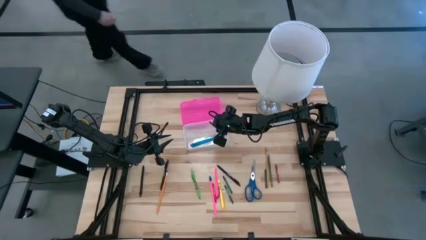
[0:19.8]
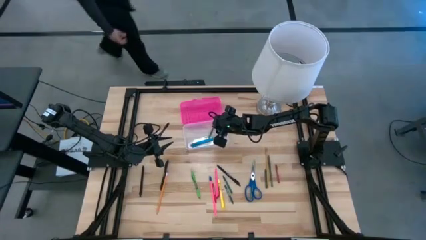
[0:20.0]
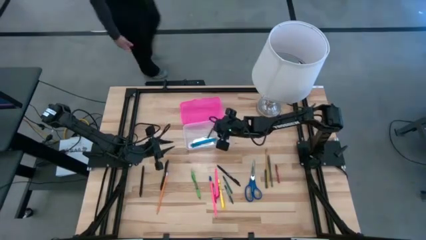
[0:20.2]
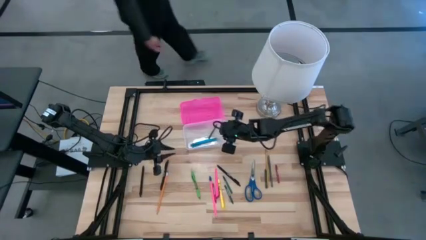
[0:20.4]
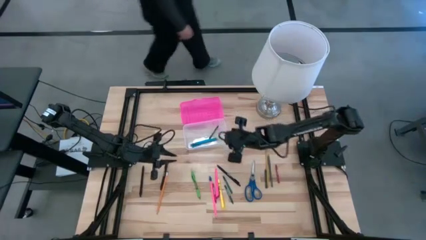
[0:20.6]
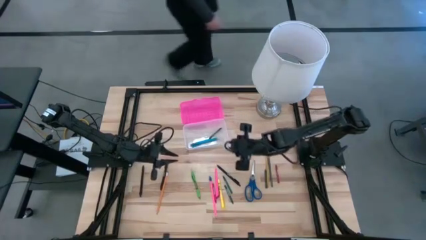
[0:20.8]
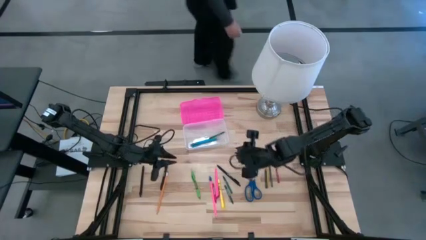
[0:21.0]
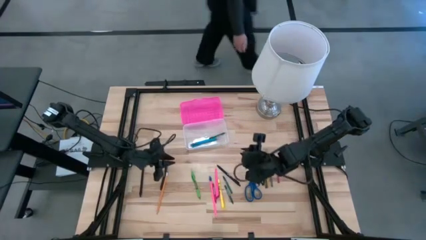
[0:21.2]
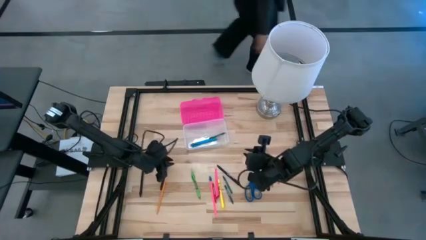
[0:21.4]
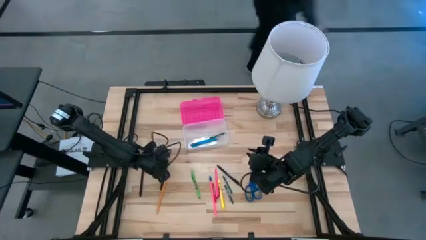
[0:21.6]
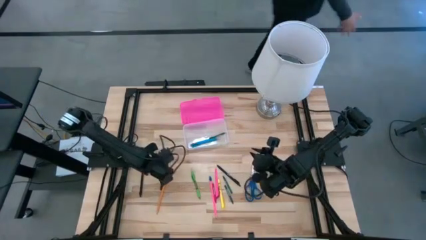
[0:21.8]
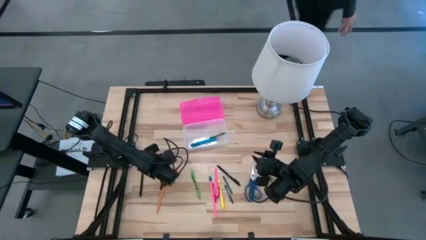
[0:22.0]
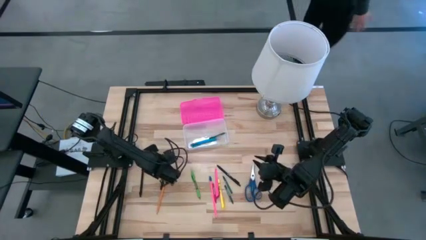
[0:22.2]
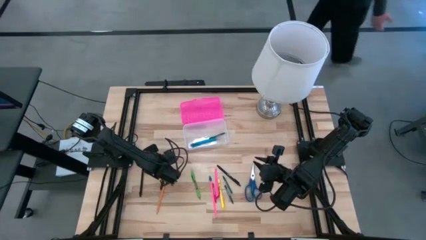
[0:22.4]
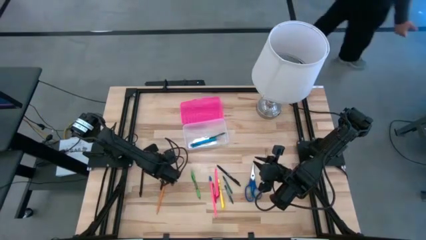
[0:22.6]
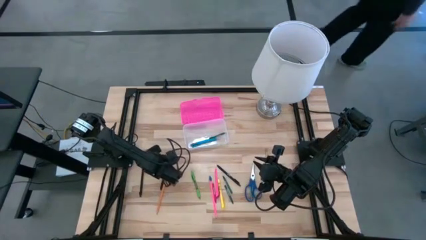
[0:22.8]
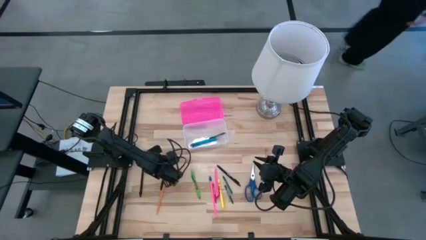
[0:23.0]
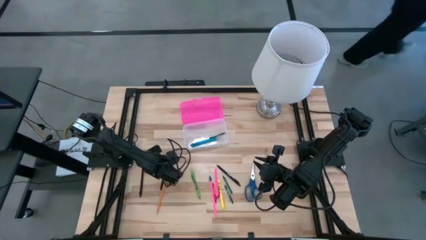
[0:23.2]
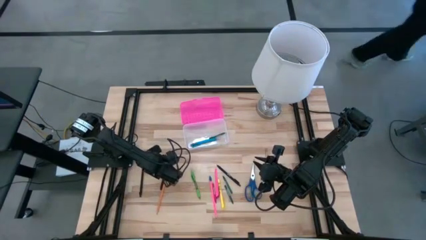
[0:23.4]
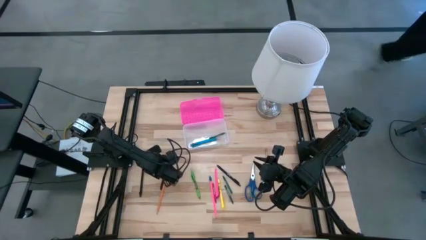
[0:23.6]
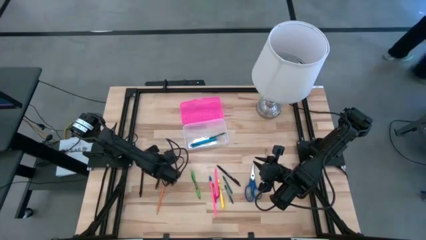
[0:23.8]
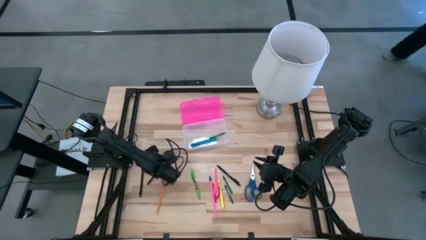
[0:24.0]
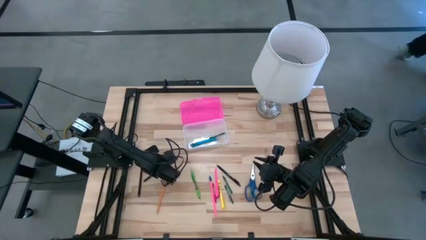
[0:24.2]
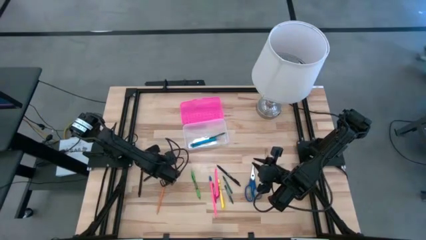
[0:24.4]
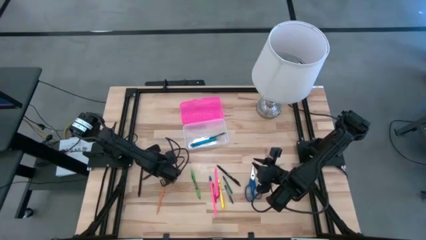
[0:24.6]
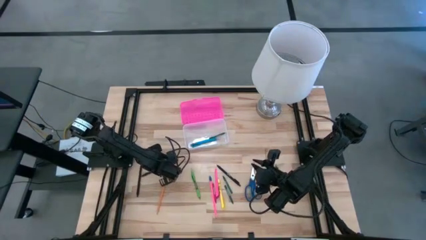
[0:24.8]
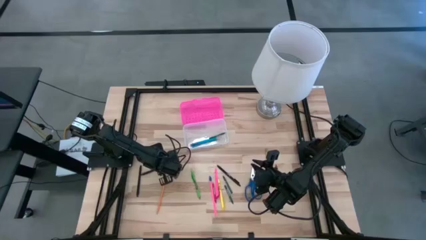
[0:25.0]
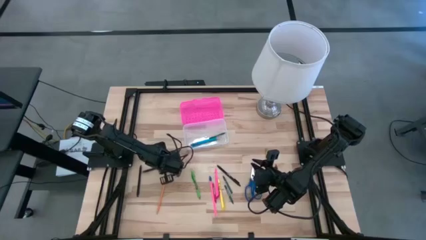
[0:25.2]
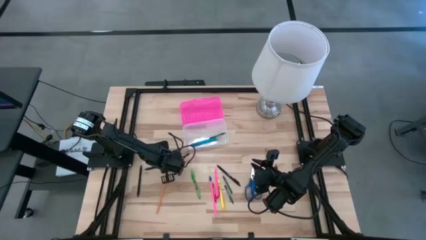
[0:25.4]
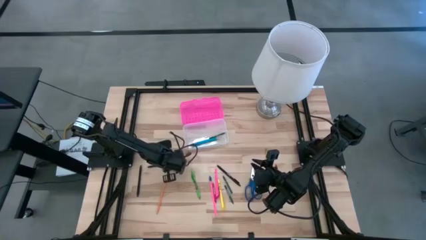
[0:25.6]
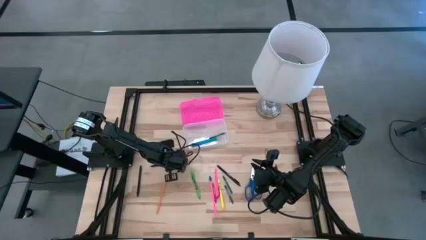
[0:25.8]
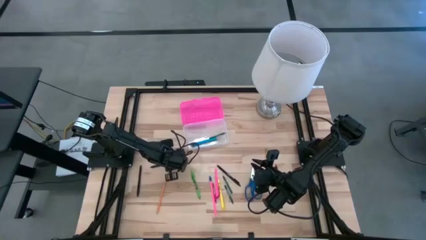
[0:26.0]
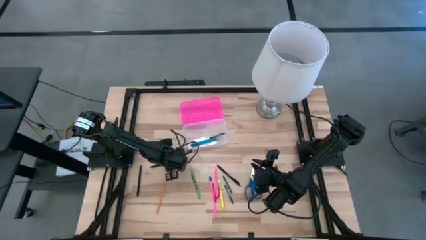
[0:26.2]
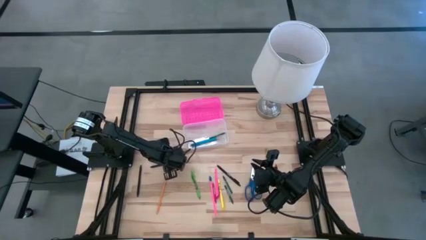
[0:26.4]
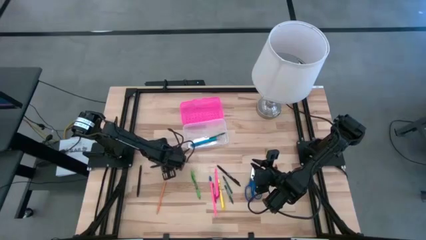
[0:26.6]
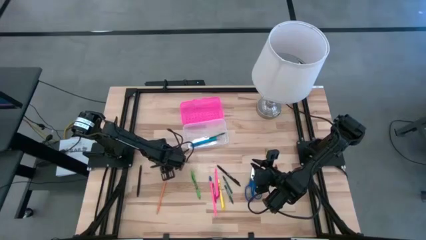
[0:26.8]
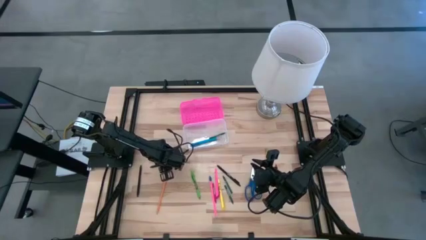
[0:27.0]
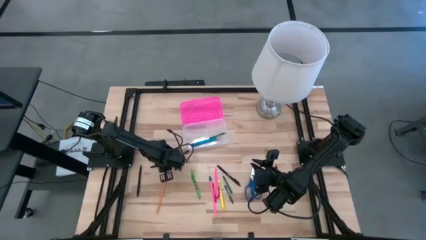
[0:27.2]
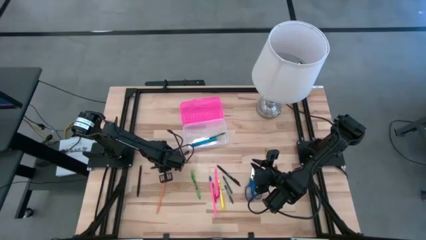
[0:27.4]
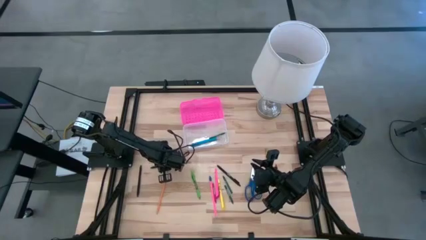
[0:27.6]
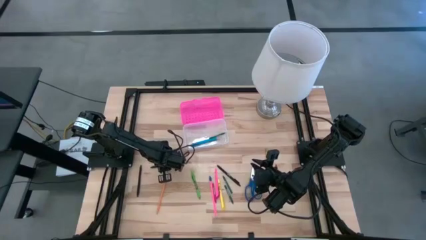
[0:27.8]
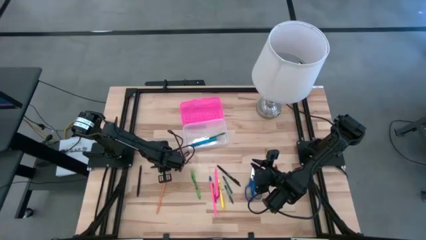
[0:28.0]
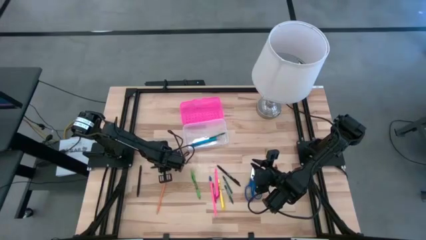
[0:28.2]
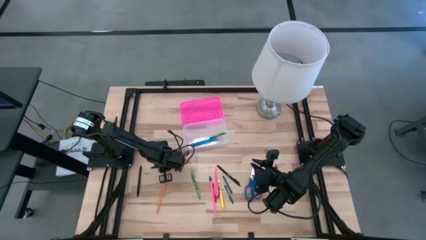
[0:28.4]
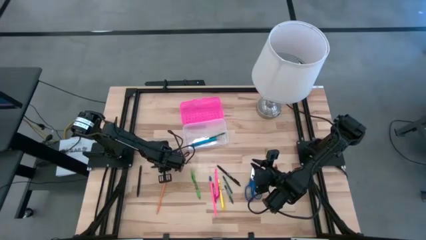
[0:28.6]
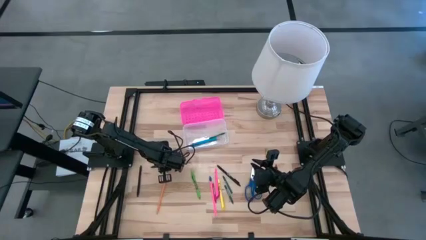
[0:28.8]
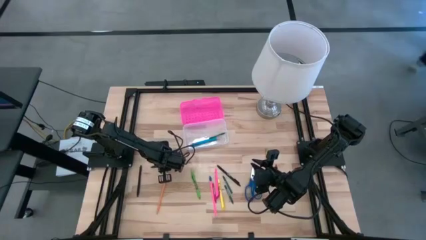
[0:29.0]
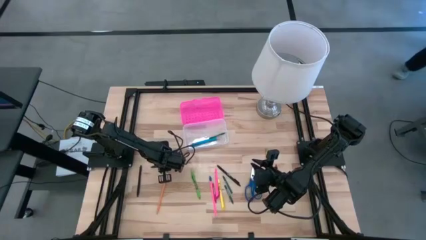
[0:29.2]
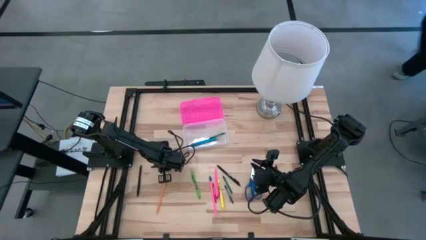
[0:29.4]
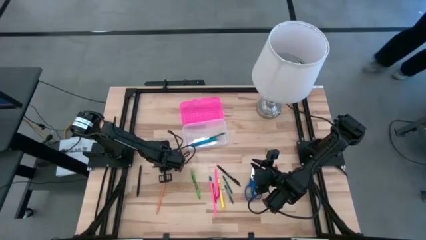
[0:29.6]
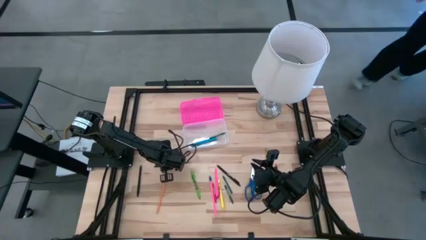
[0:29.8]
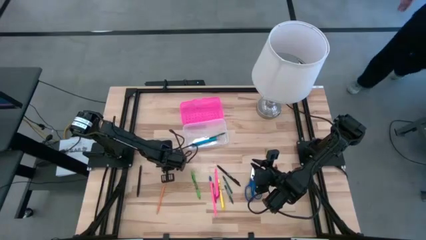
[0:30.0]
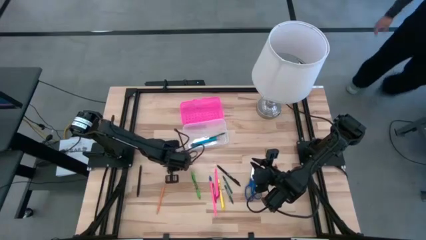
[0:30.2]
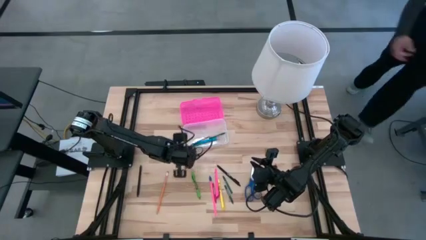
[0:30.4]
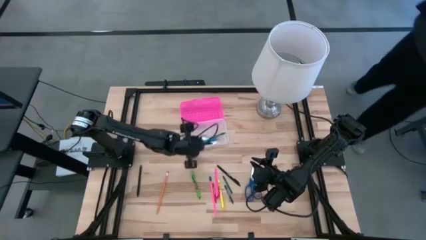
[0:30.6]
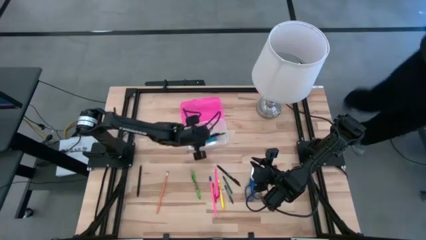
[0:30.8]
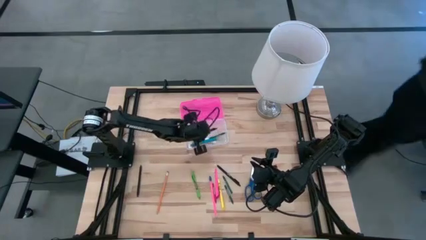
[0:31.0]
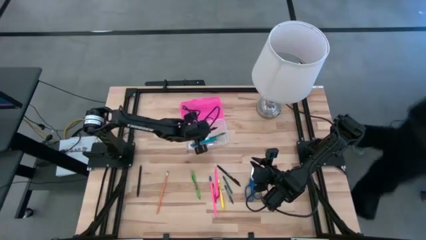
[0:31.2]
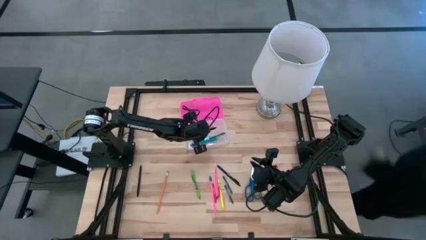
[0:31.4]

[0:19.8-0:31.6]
Task: Pick & place school supplies into a supply box
Put the black pen into the pink supply box

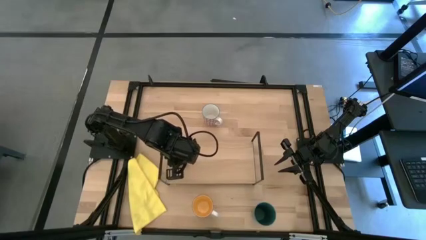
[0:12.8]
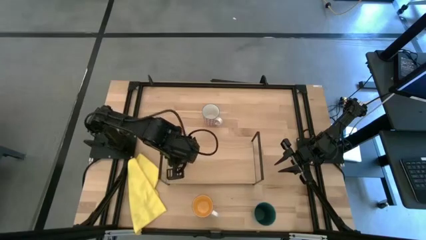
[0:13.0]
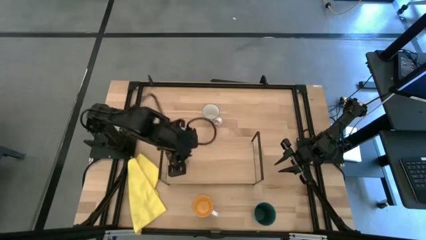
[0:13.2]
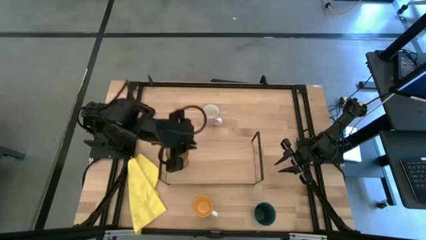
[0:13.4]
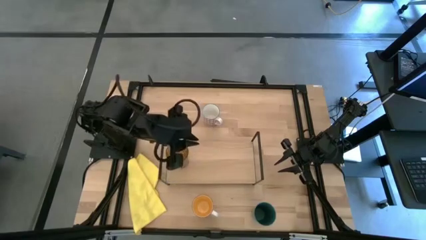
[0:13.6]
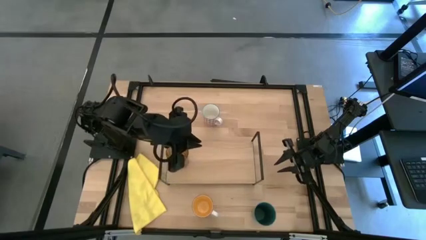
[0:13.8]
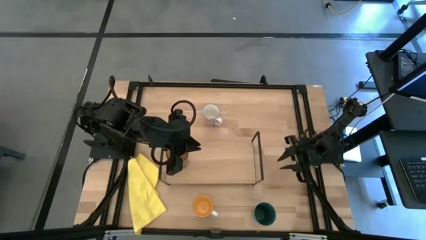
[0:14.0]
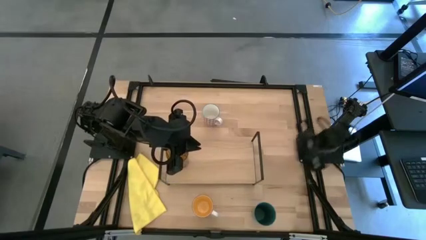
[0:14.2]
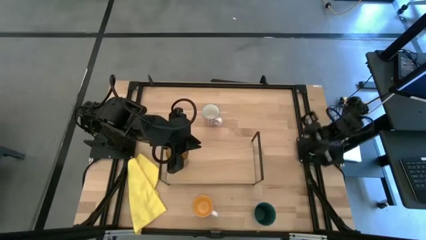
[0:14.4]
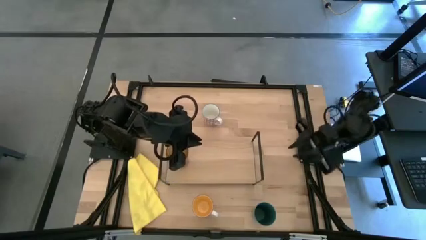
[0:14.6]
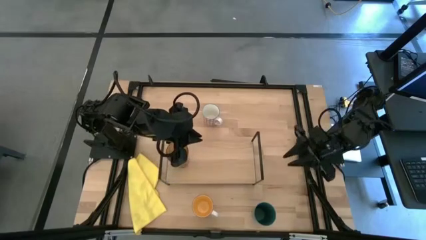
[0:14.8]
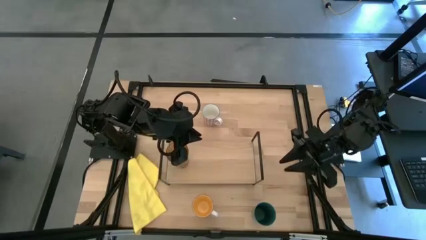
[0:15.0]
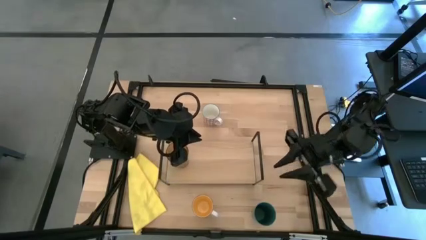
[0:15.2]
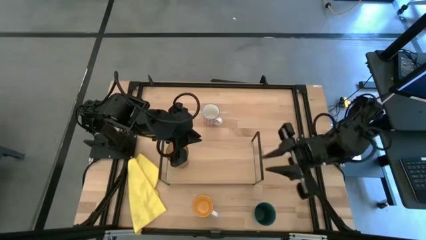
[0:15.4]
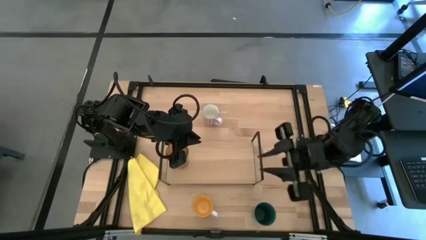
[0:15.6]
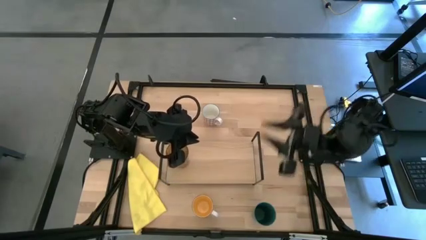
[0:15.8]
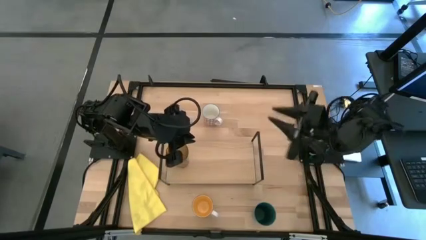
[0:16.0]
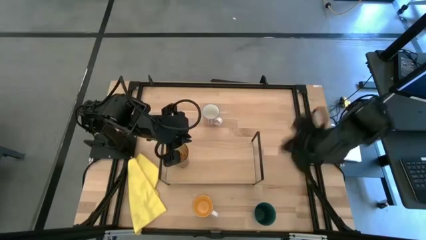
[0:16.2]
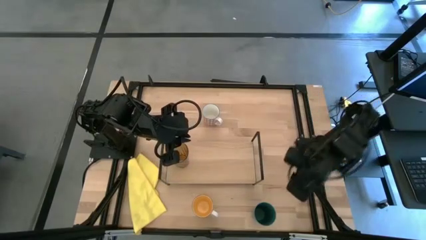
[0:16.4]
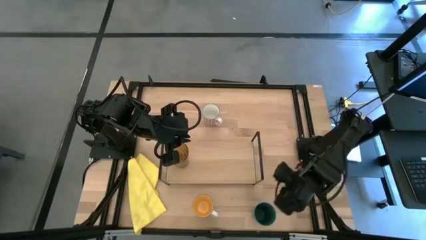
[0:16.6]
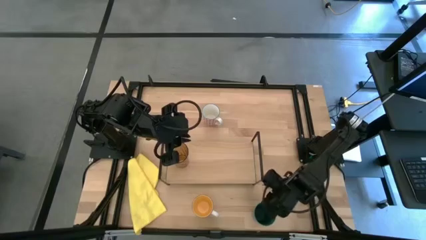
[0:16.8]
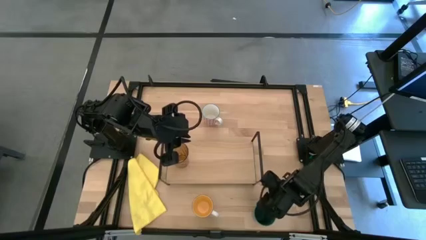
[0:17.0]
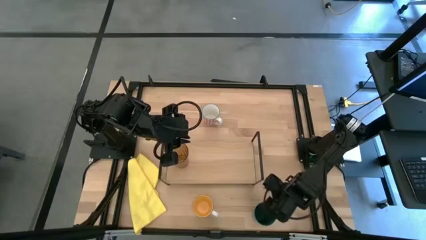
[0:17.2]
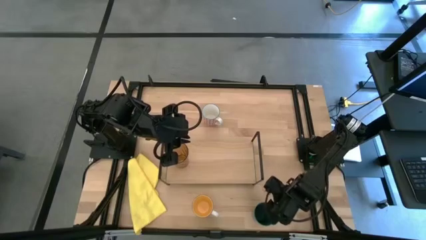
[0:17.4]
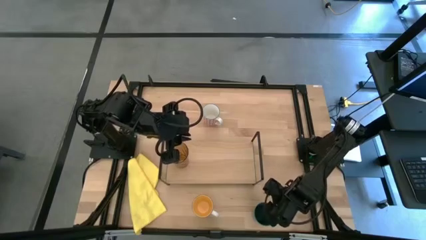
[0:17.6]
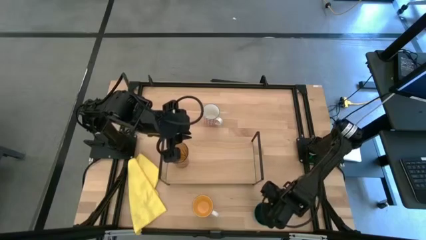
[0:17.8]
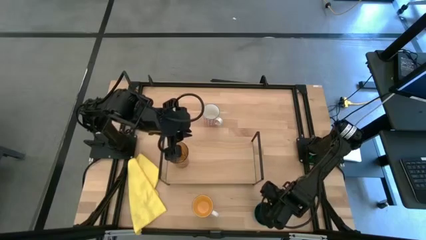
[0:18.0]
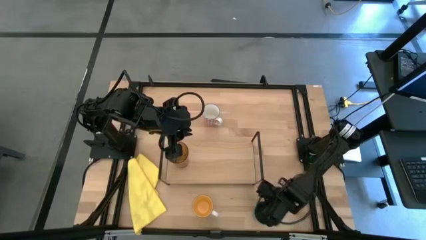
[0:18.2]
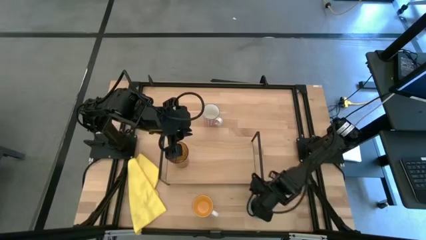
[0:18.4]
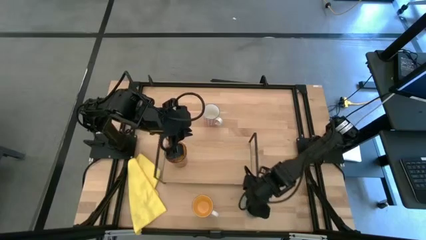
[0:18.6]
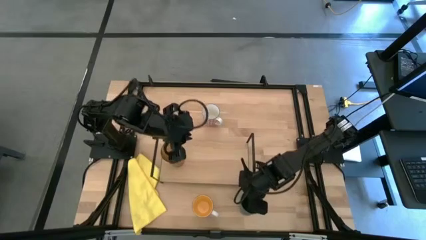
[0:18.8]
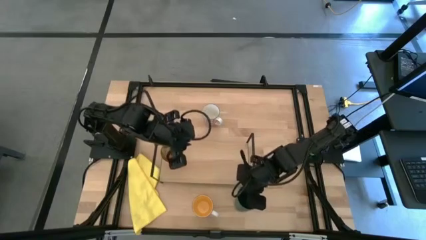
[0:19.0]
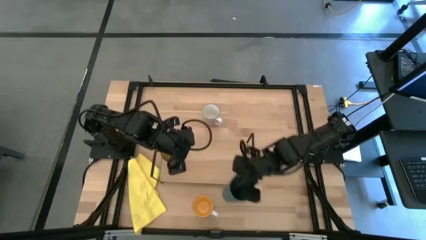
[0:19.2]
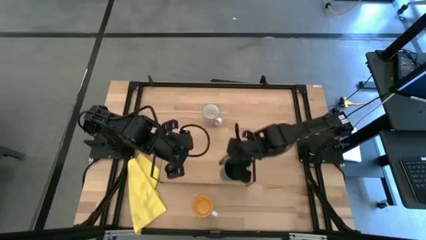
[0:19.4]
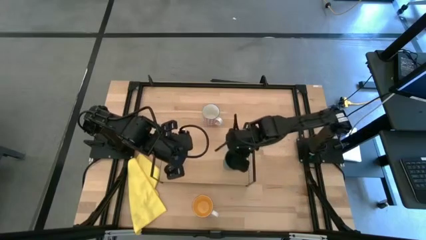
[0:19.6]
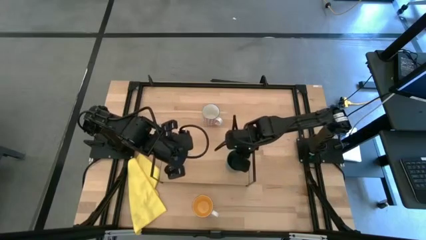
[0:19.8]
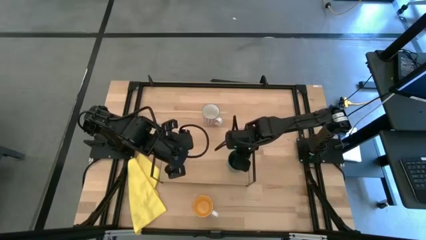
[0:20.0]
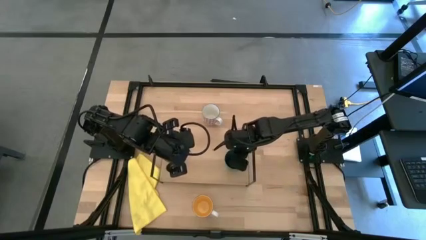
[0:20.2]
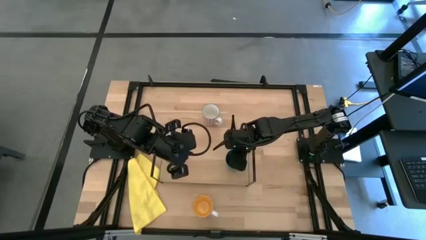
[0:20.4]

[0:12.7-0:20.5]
Task: Stack small to large cups/mugs on shelf
Put the green cup on the shelf
